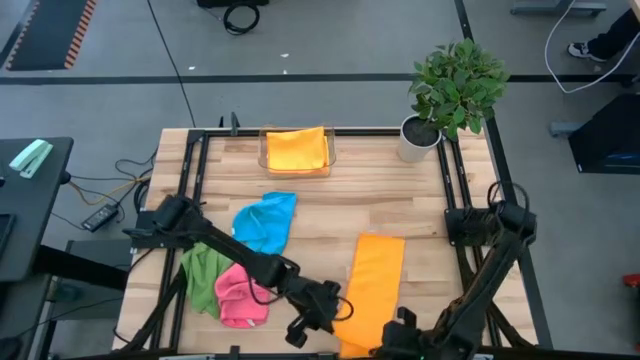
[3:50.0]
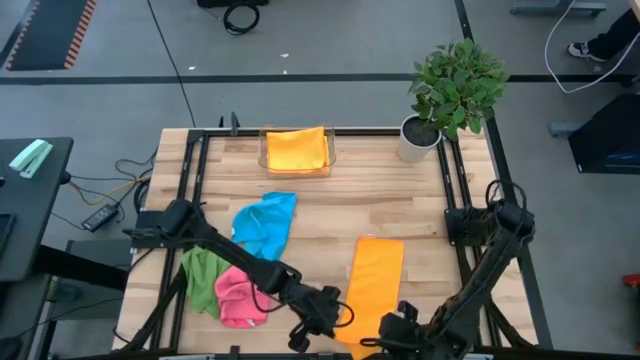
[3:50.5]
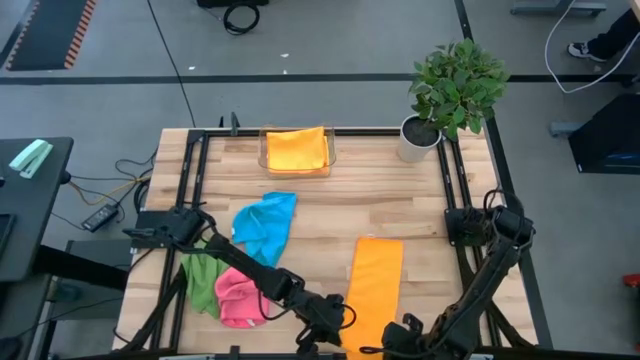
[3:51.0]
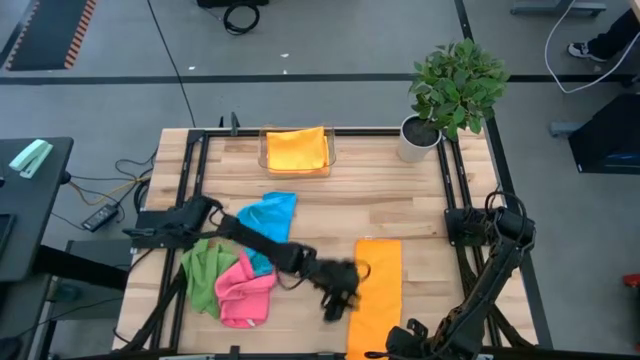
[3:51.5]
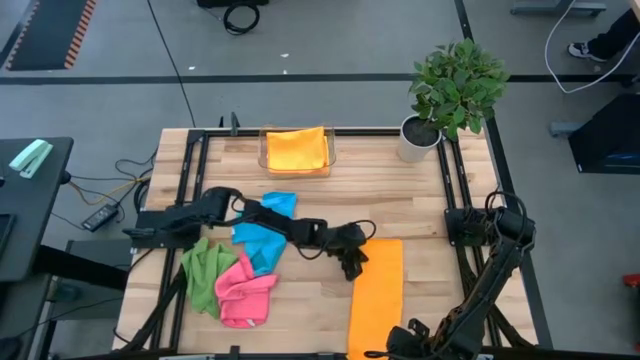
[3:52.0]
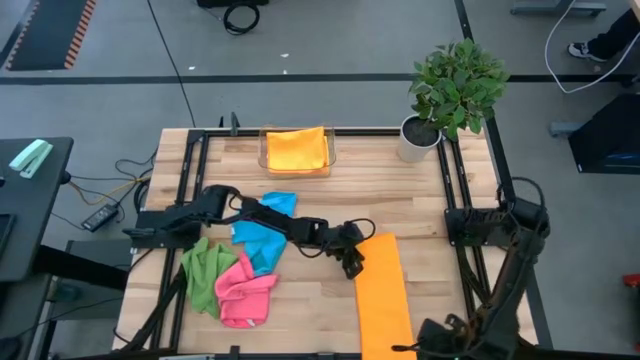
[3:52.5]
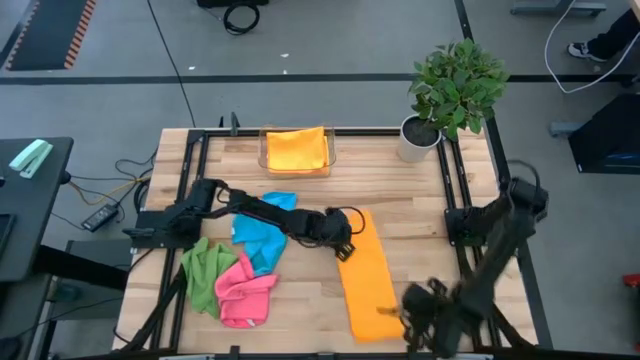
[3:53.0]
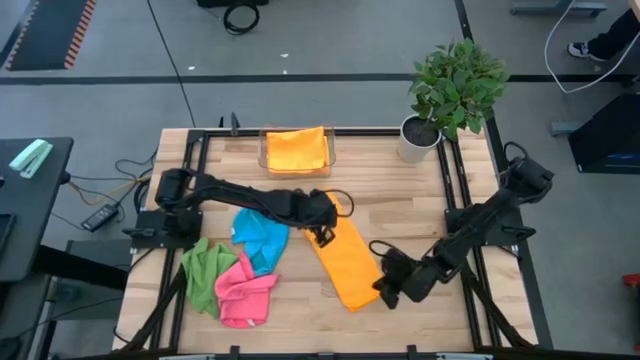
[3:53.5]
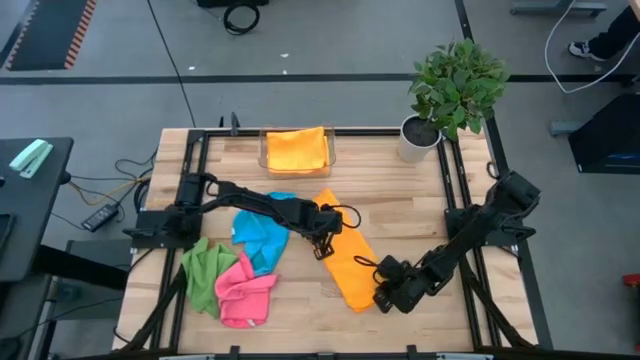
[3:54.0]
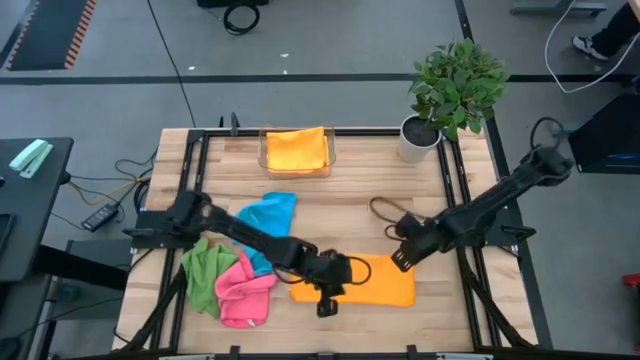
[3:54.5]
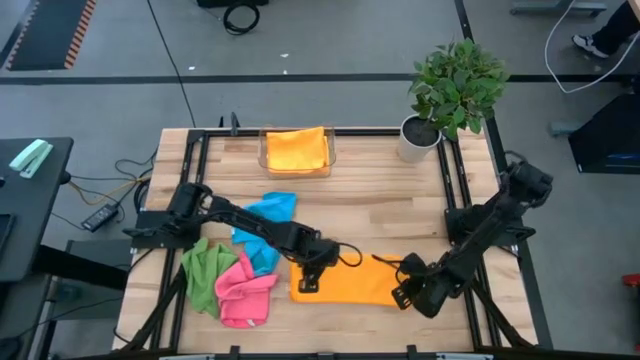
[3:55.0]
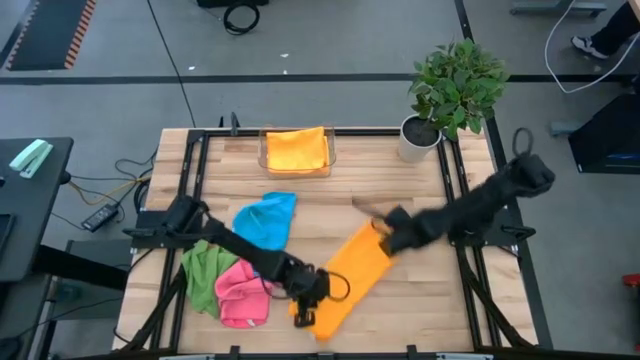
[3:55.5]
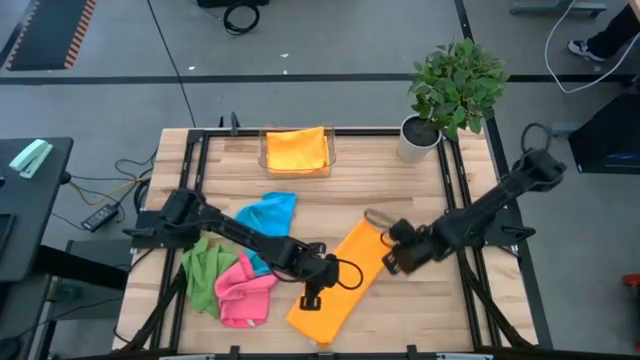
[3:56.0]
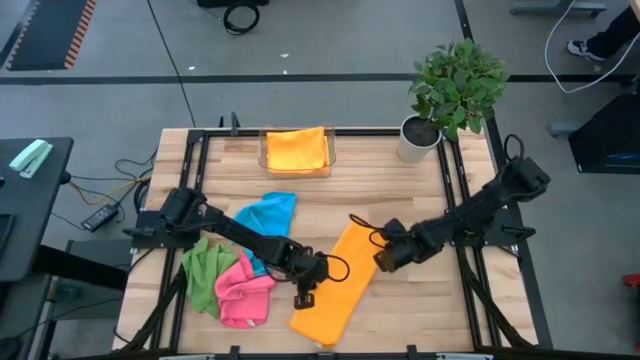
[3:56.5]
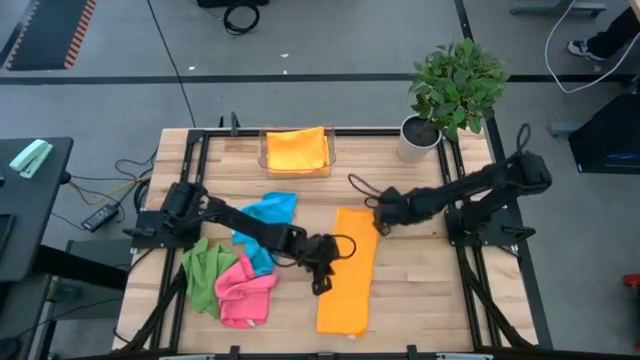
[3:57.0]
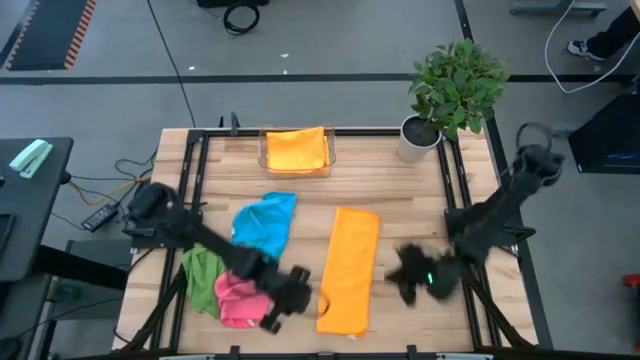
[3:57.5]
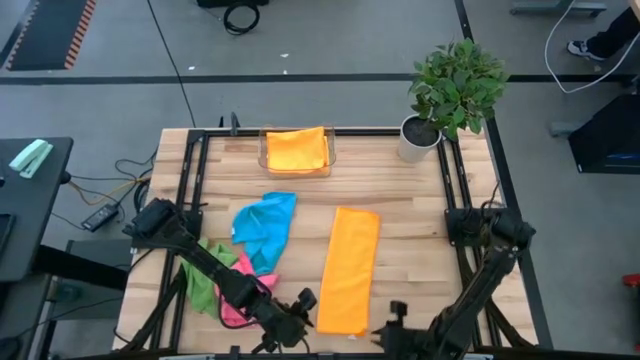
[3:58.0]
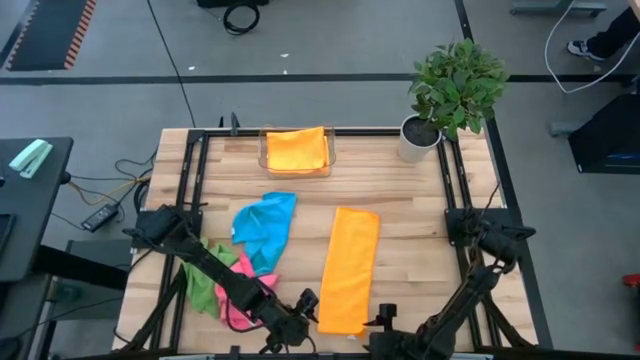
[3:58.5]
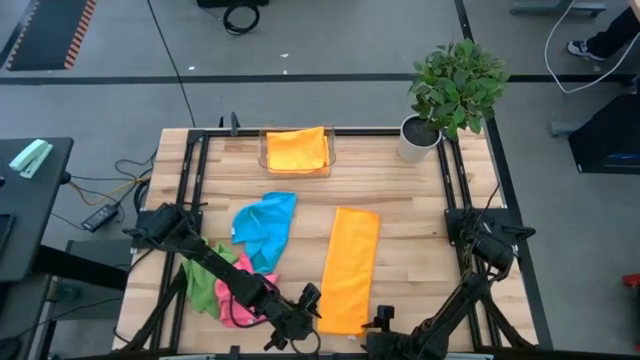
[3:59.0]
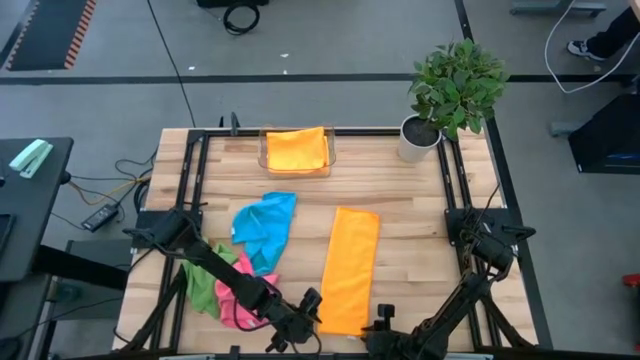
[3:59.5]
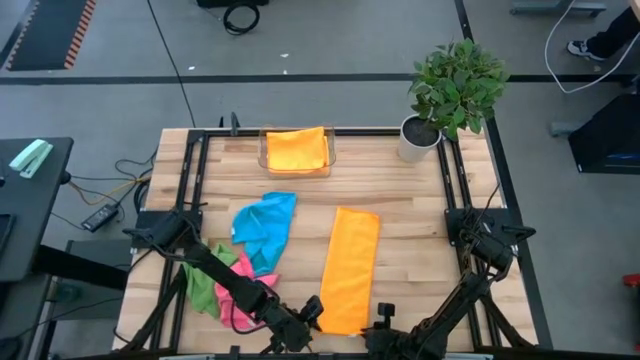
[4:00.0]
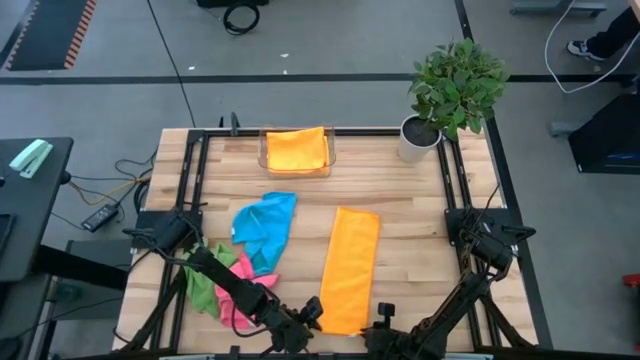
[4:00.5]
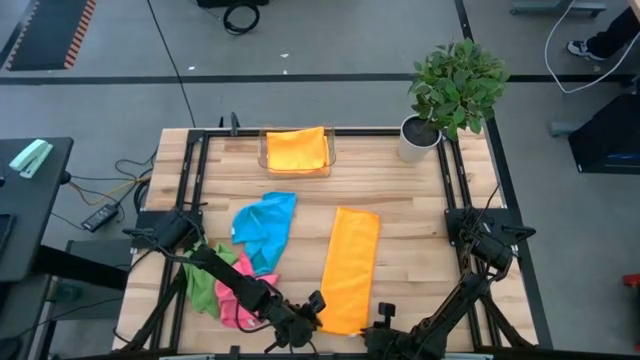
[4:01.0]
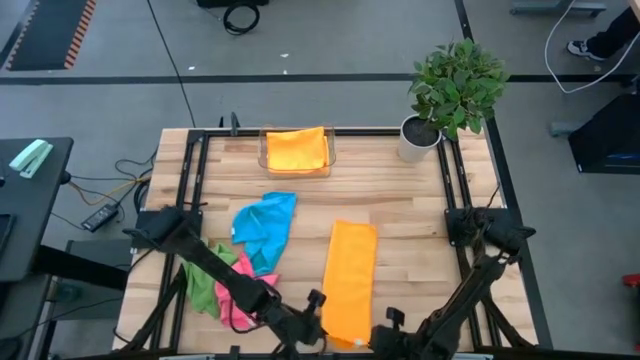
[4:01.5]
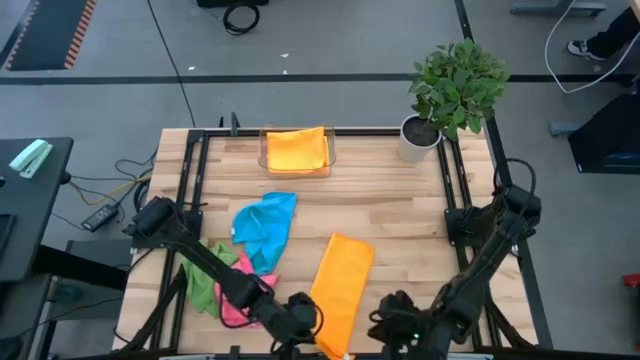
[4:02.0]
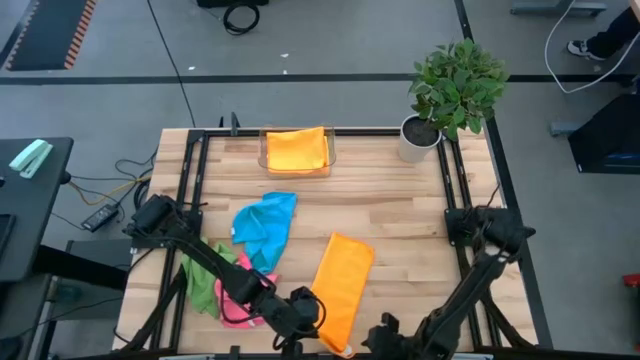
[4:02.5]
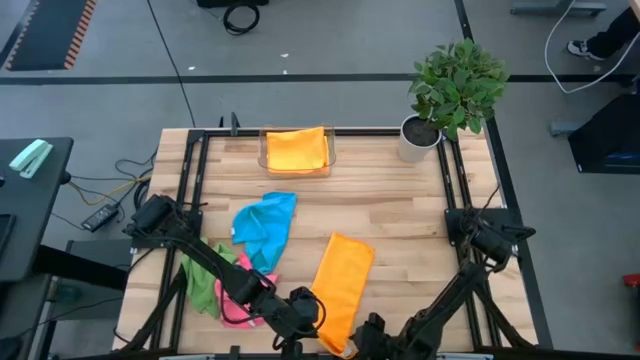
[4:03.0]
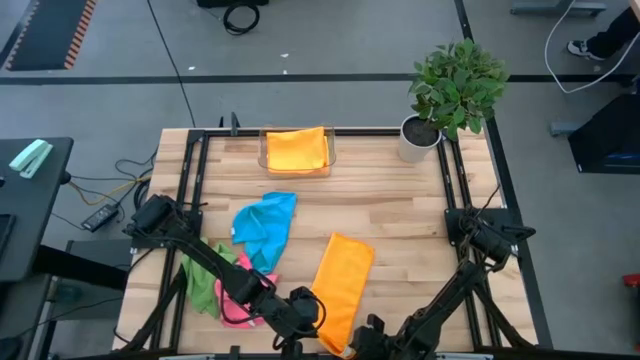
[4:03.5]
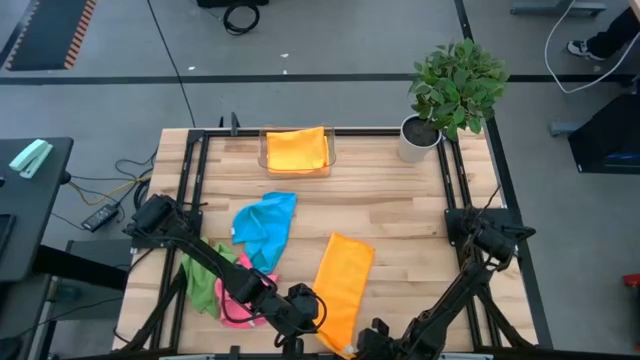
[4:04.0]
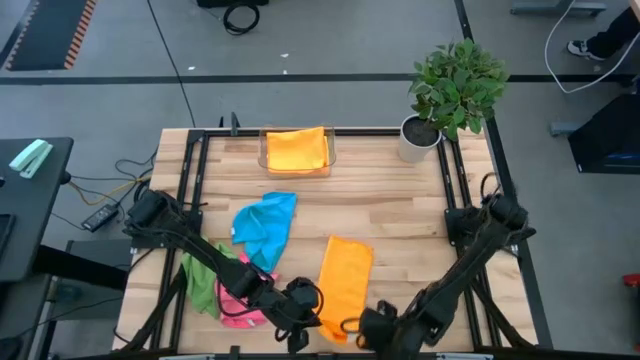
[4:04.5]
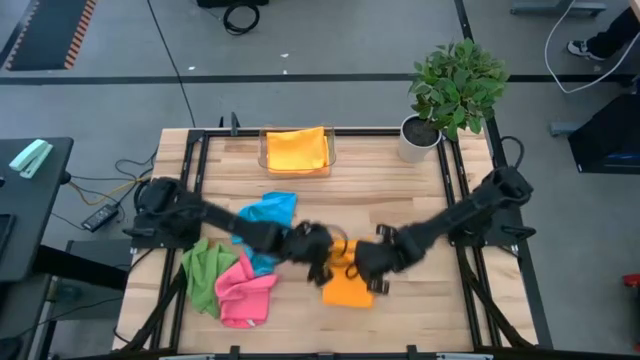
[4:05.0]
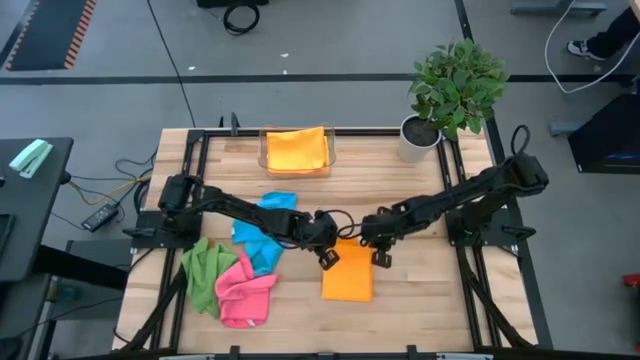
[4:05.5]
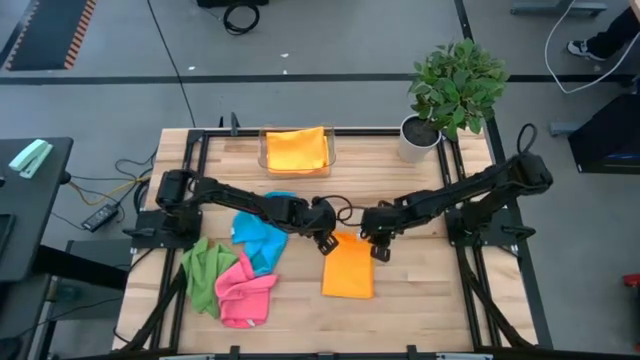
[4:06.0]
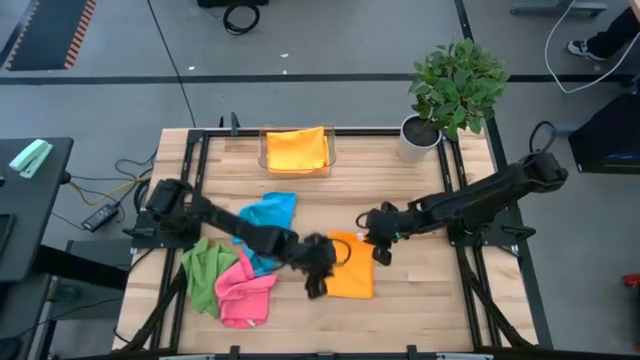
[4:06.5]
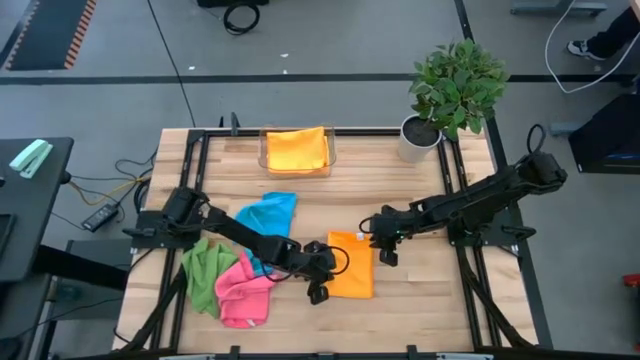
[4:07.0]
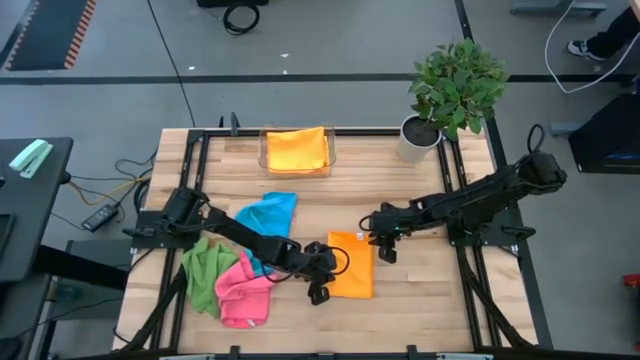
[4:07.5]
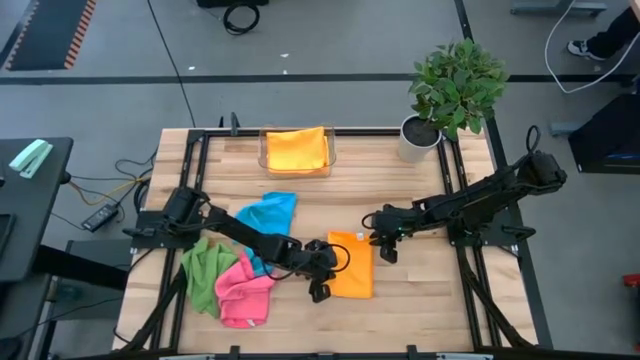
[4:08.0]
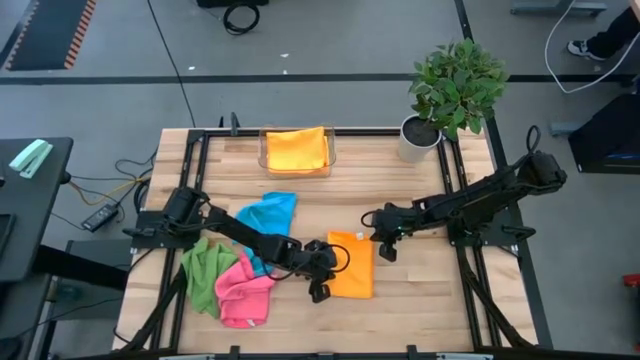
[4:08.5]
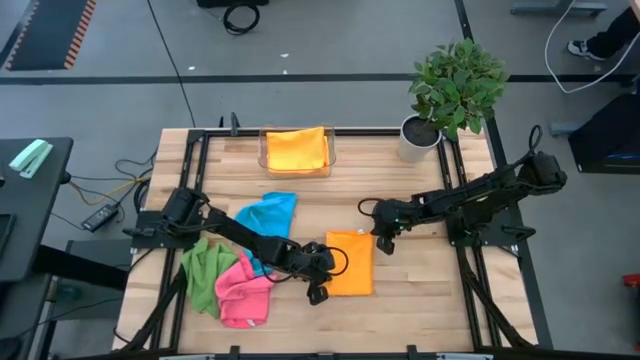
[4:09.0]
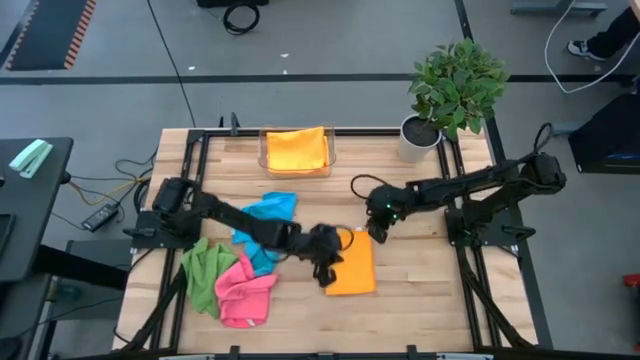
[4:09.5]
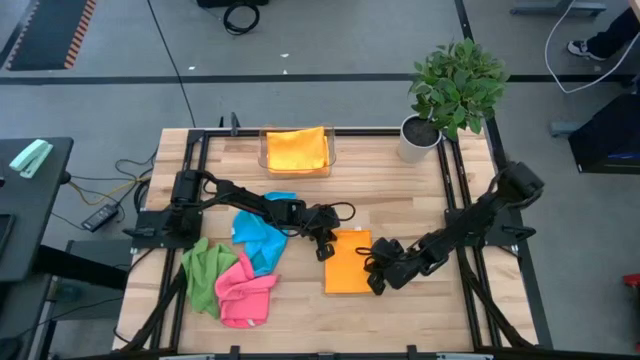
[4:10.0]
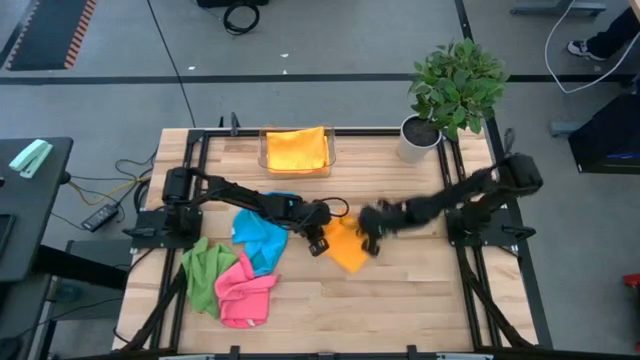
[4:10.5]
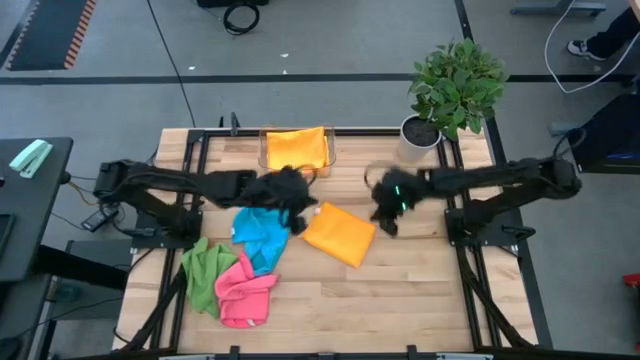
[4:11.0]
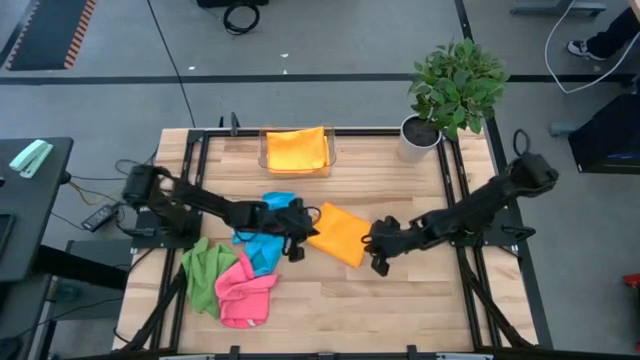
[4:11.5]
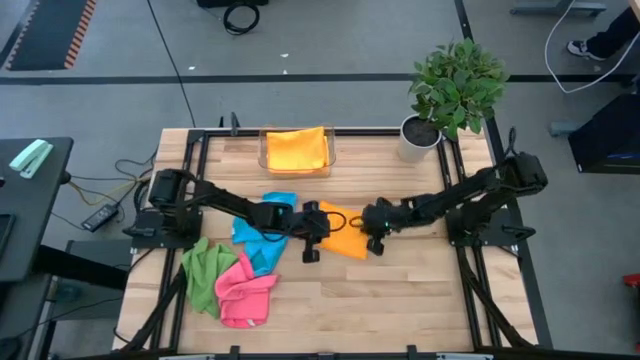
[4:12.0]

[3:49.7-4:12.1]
Task: Fold microfiber towels
Fold the orange microfiber towel
